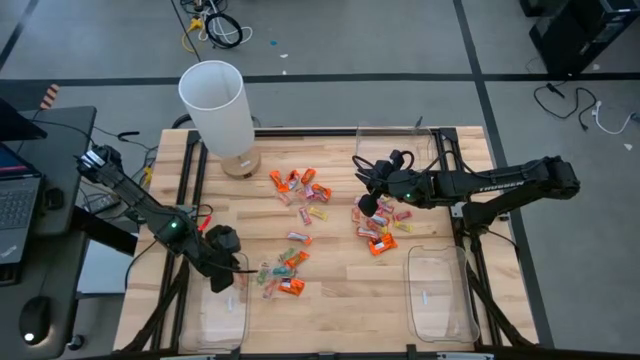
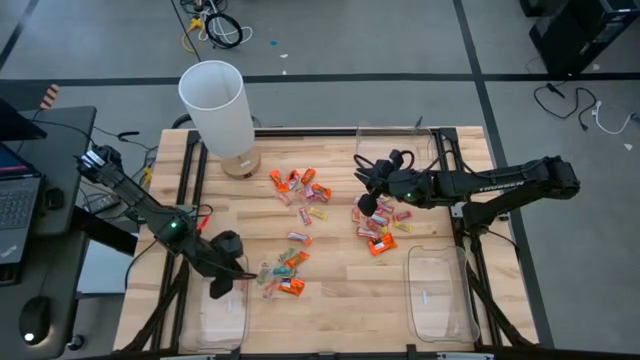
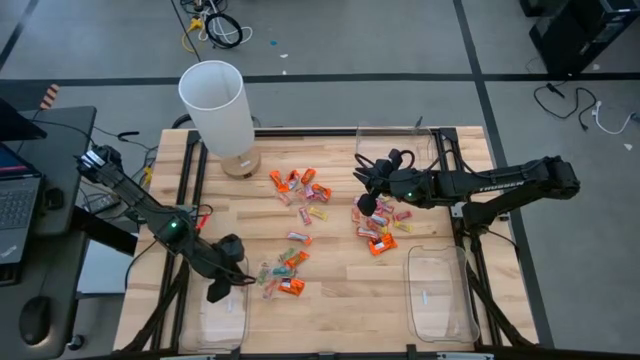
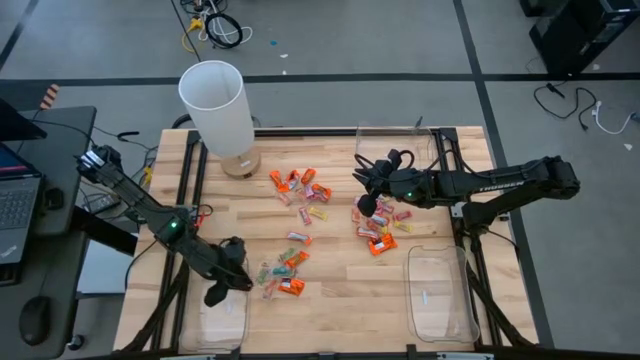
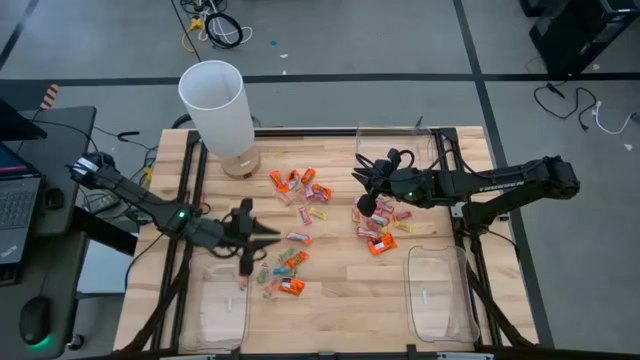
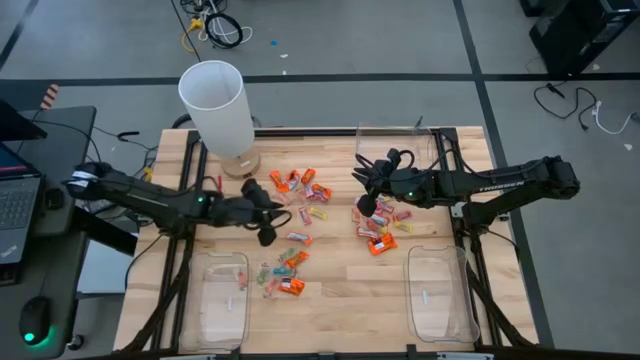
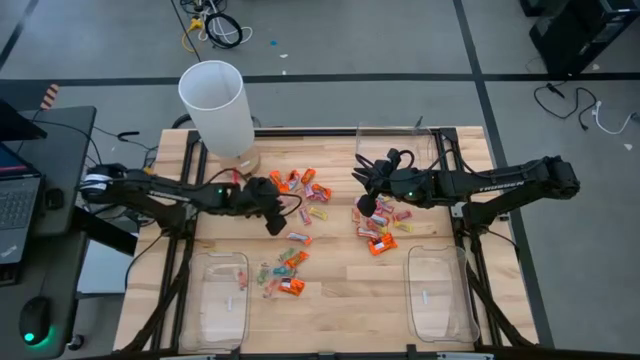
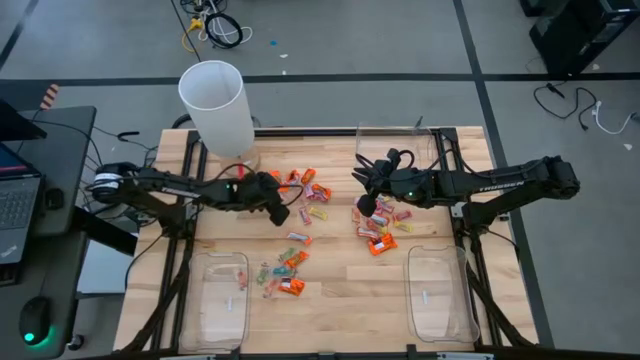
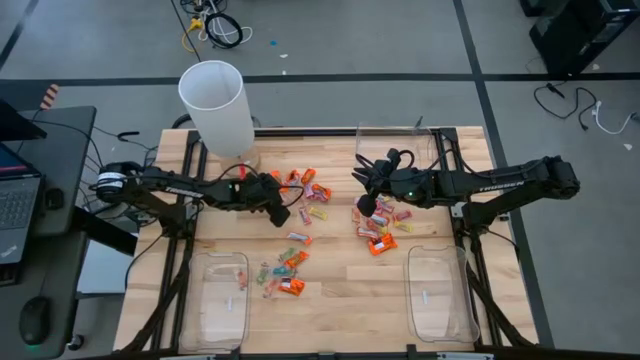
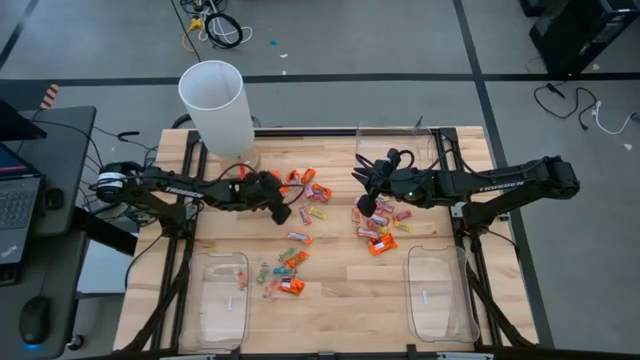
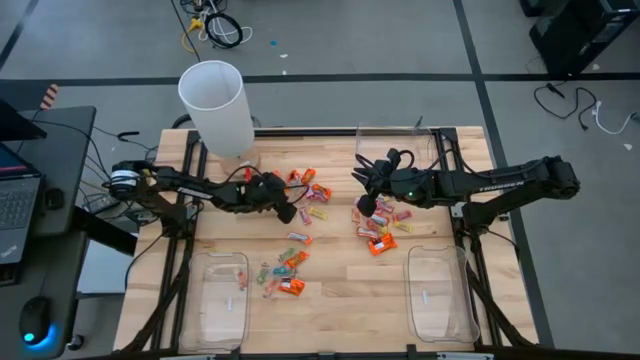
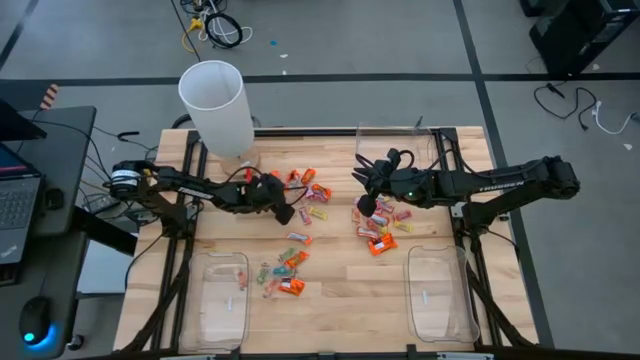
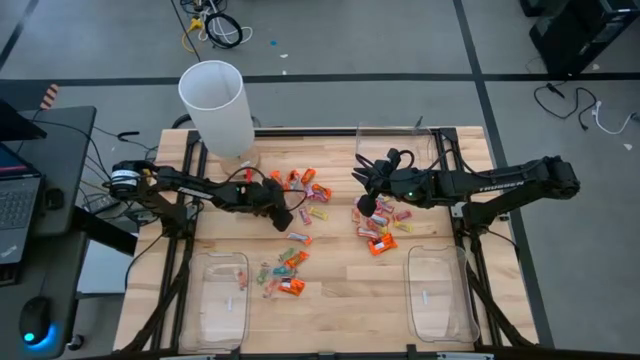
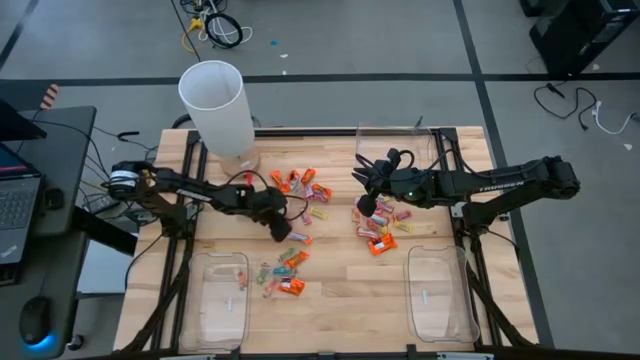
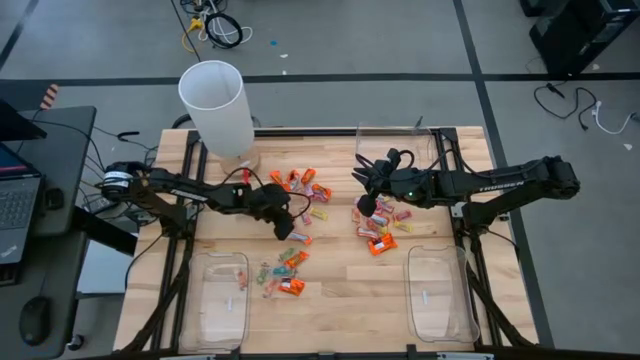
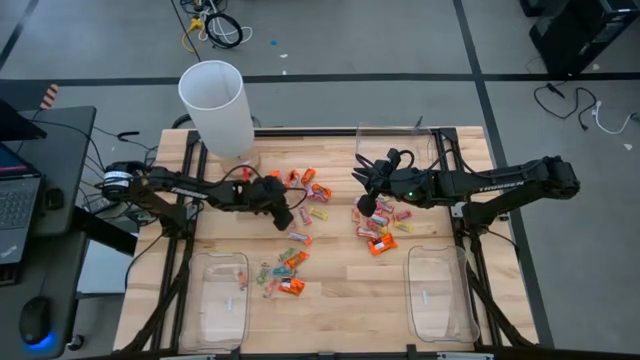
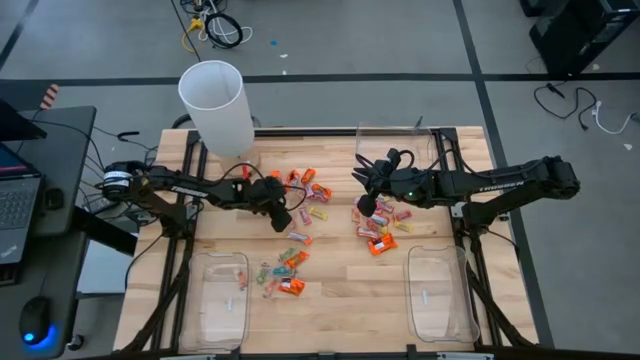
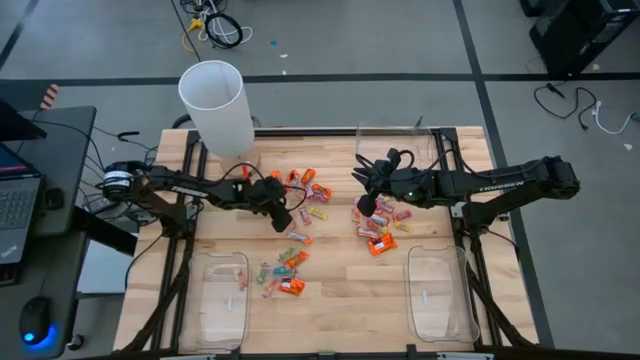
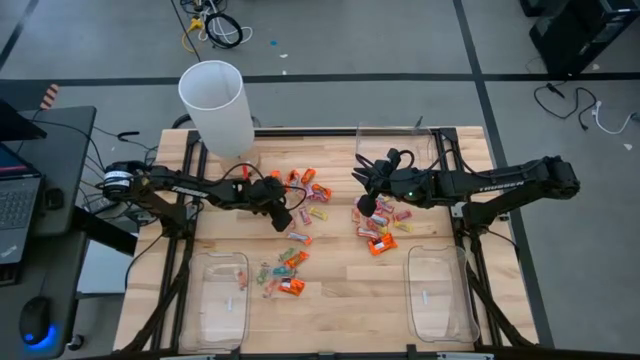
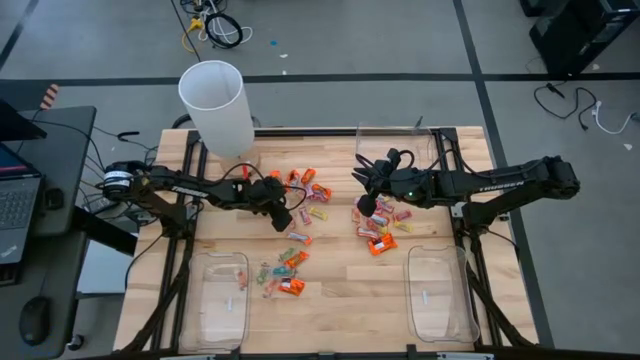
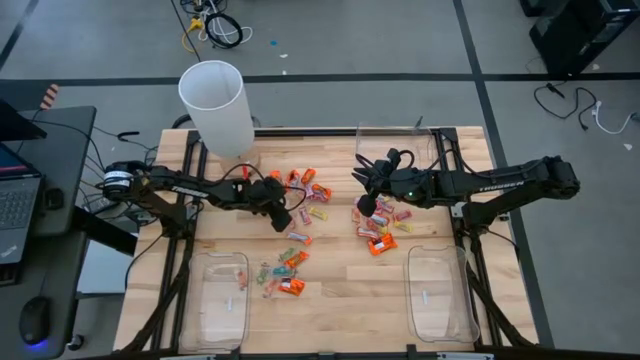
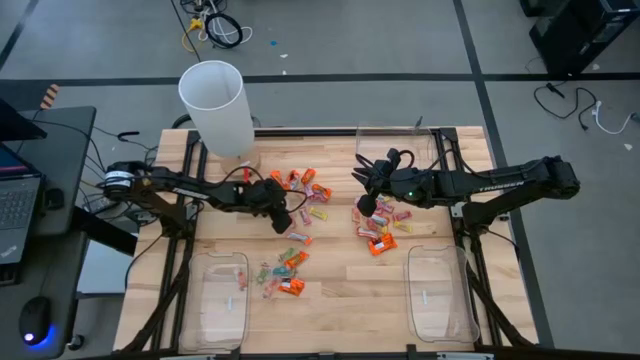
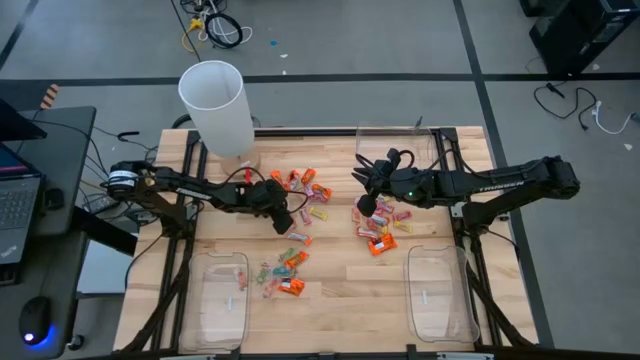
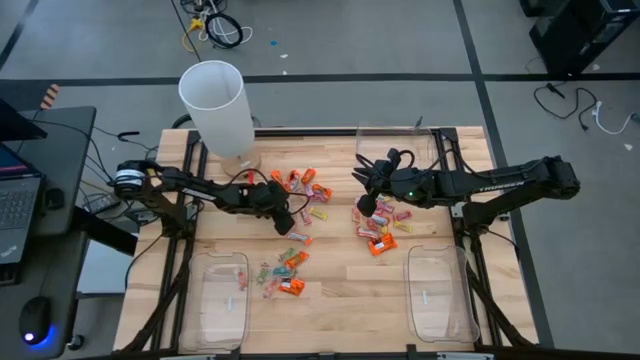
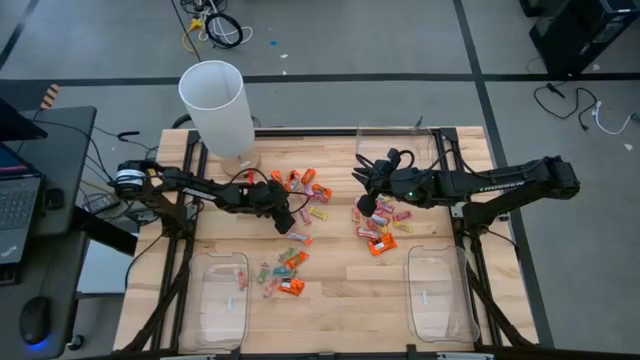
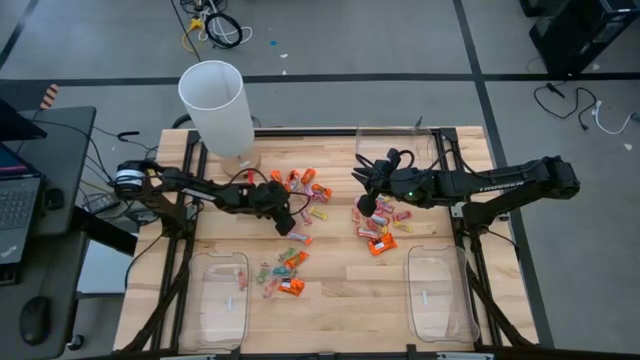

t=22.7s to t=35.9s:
Task: Sort candy
Put the orange gummy into the bottom left transparent bin

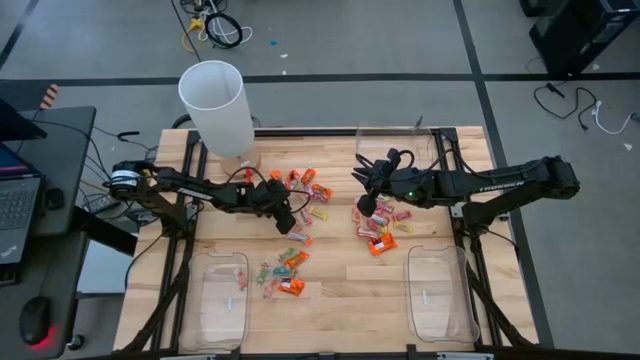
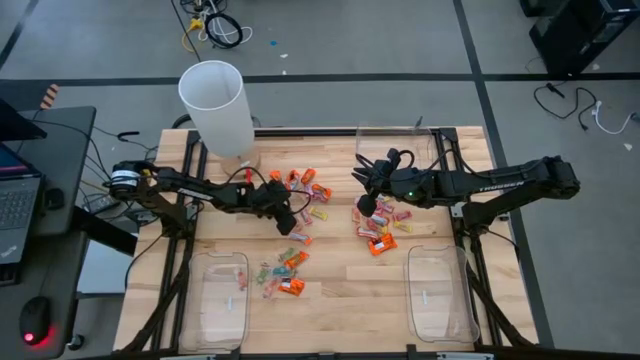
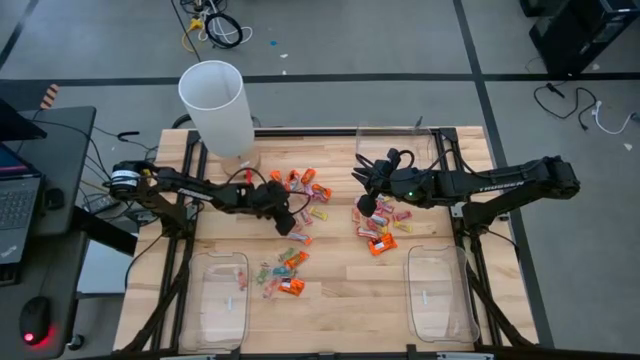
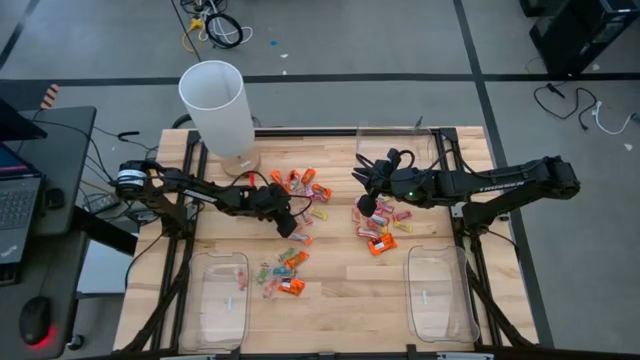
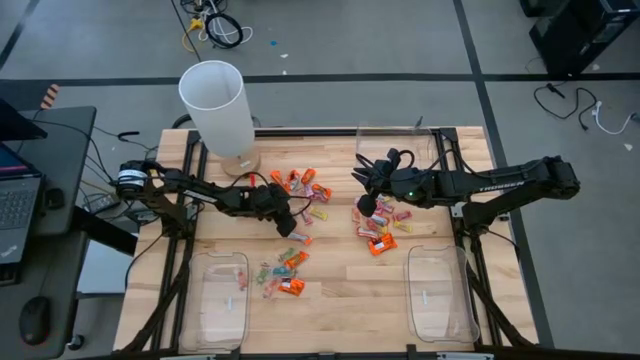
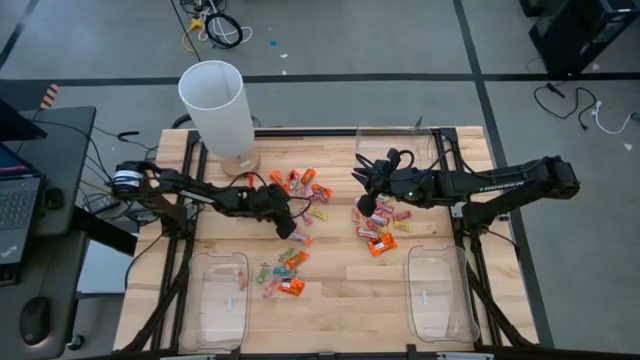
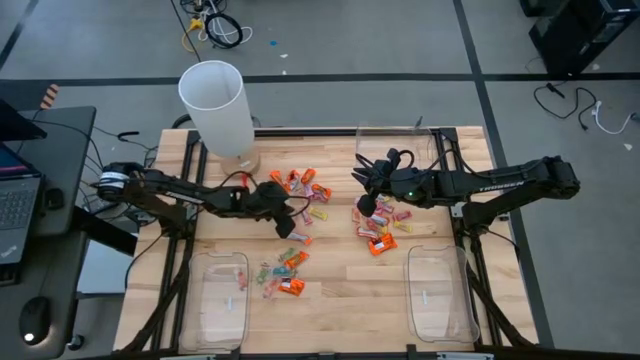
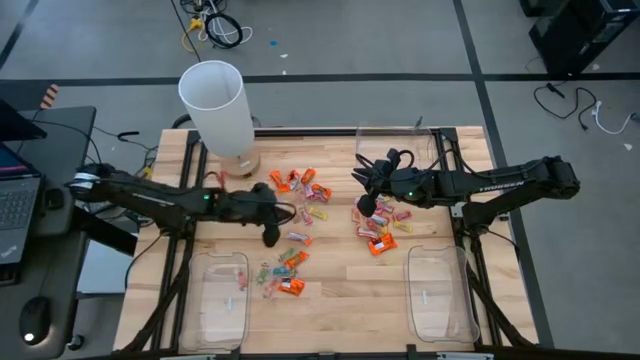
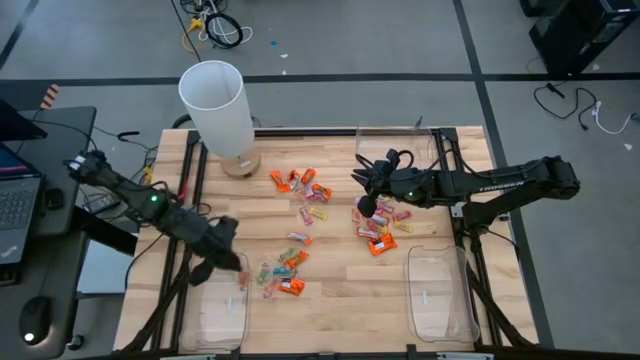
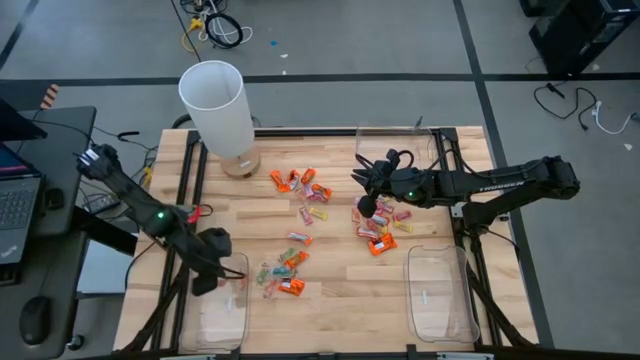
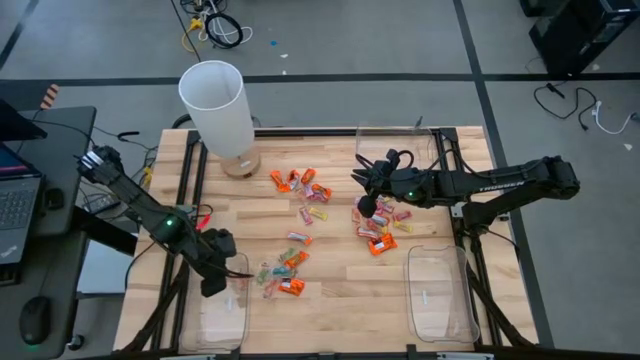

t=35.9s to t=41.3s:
Put the orange gummy into the bottom left transparent bin

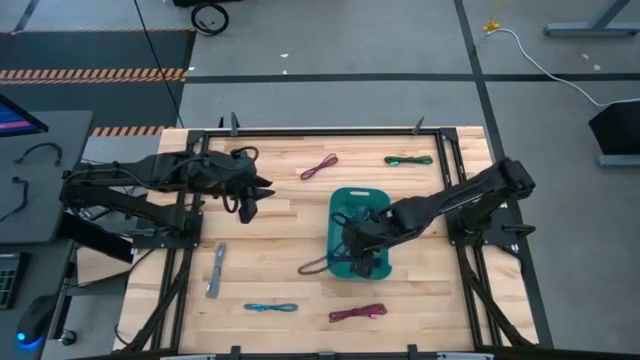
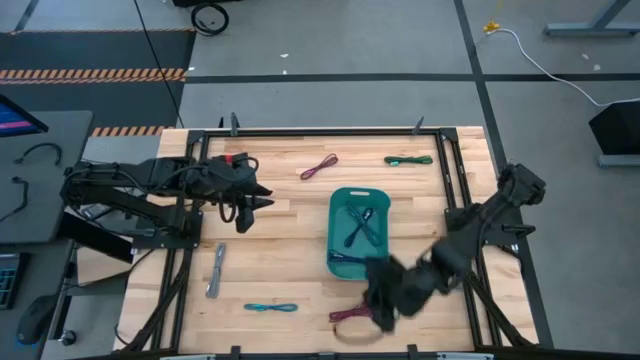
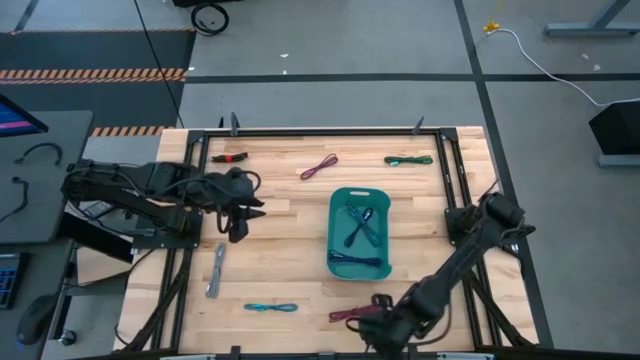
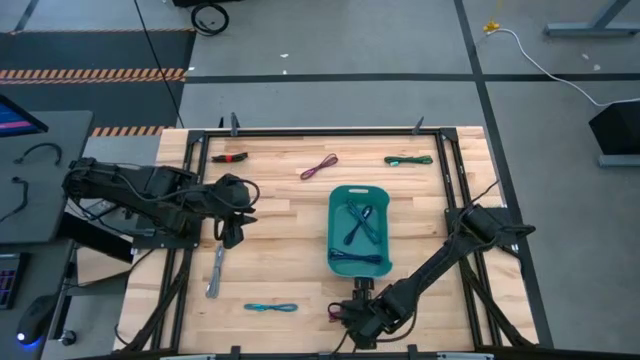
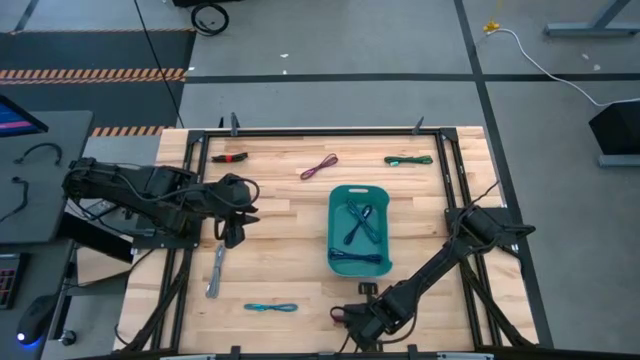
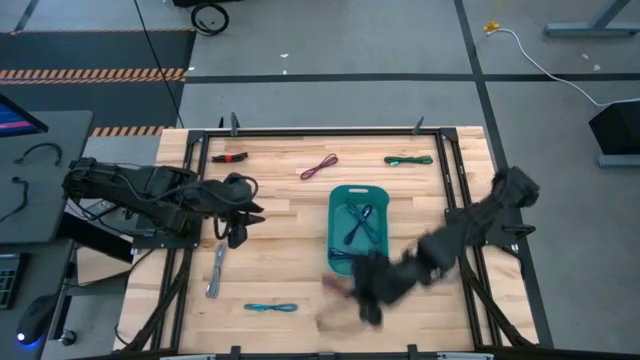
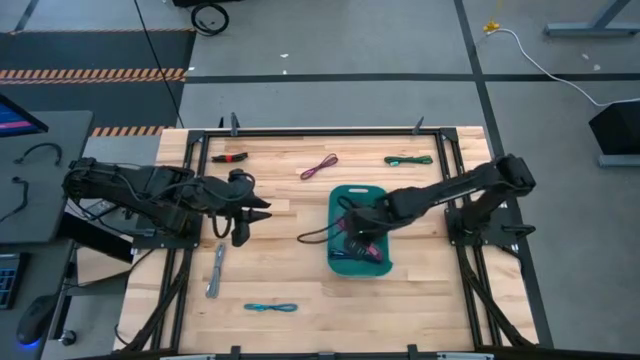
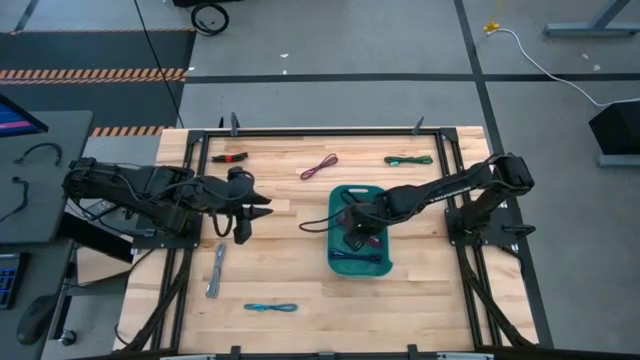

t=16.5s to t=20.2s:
Task: Pick and place USB-C Cables
Put the bottom light red USB cable into the light green bin
